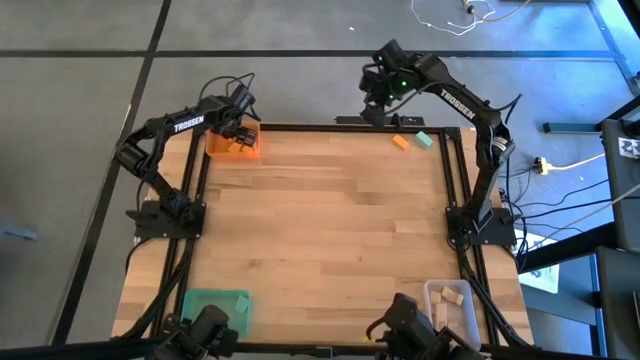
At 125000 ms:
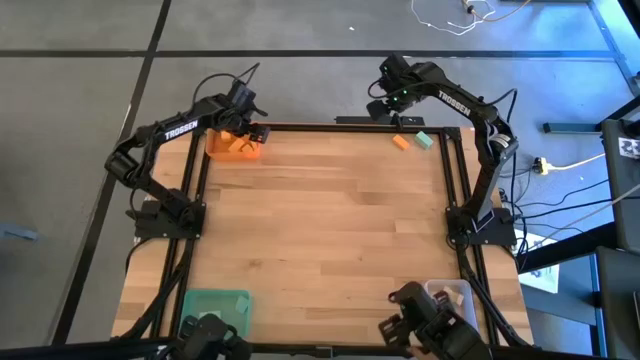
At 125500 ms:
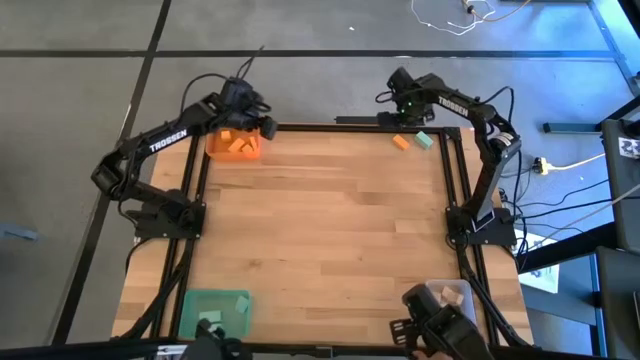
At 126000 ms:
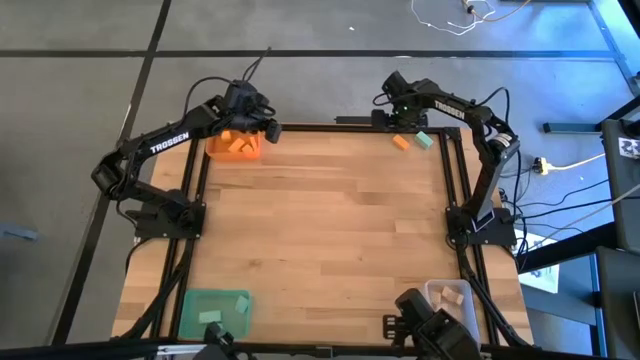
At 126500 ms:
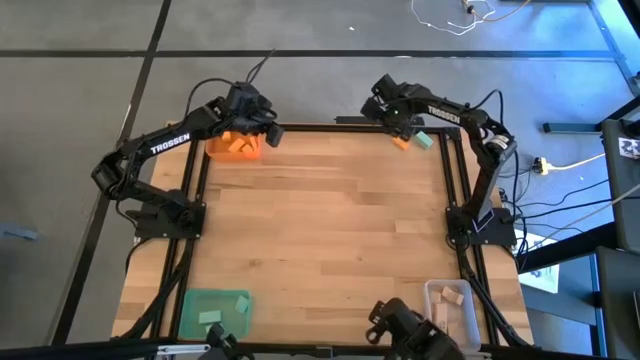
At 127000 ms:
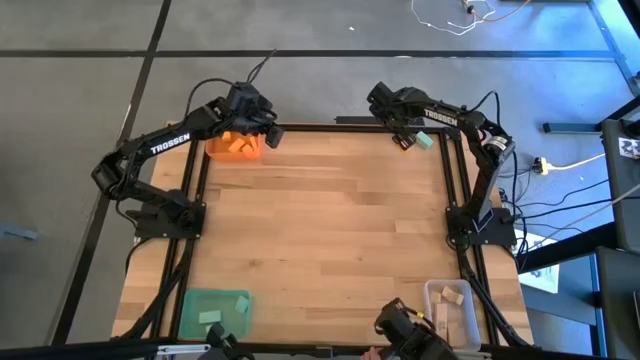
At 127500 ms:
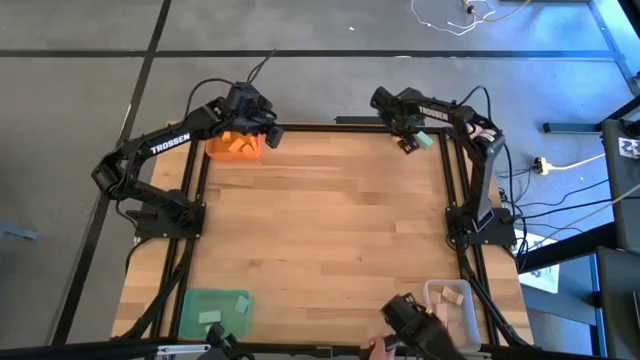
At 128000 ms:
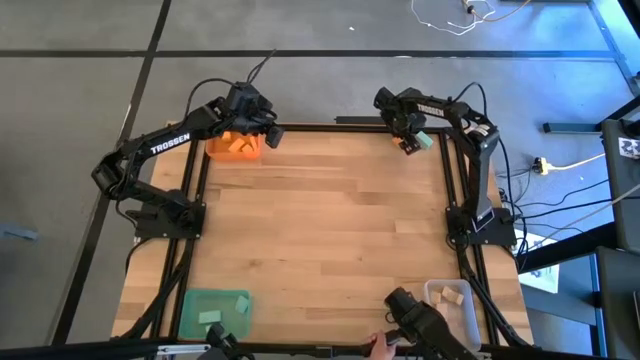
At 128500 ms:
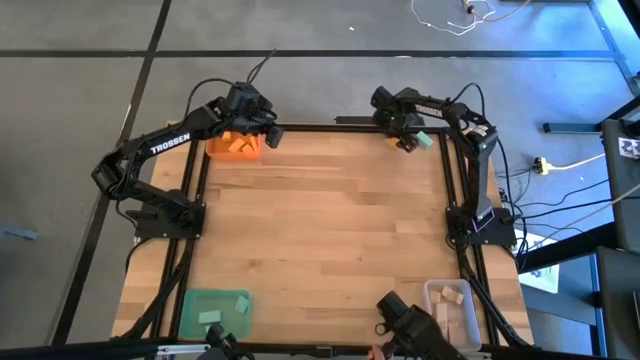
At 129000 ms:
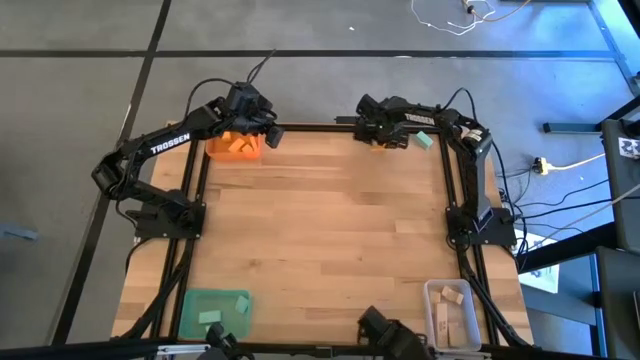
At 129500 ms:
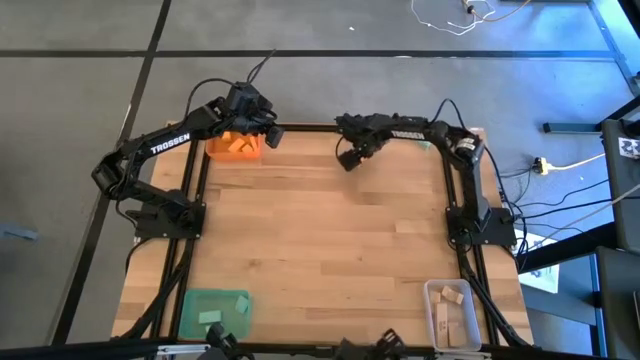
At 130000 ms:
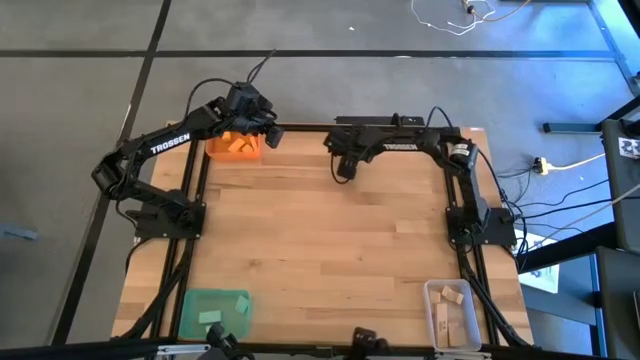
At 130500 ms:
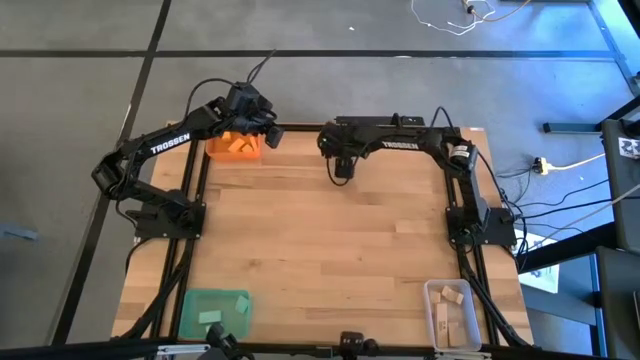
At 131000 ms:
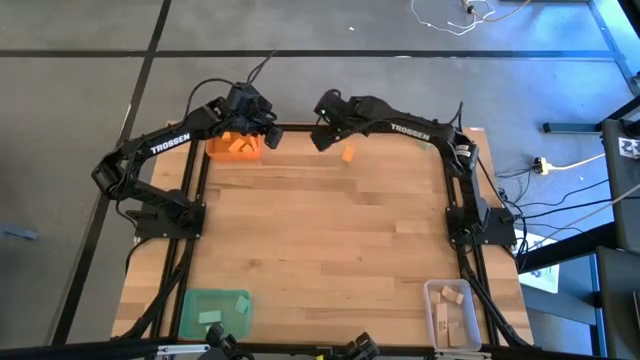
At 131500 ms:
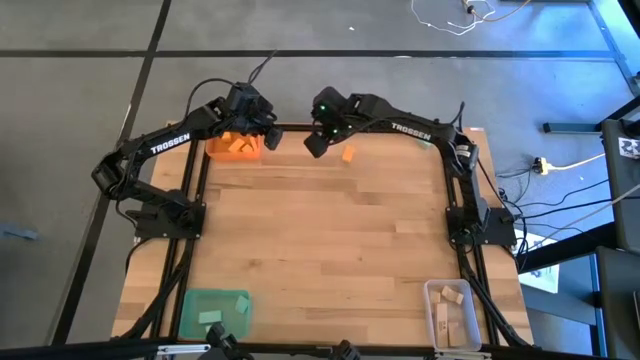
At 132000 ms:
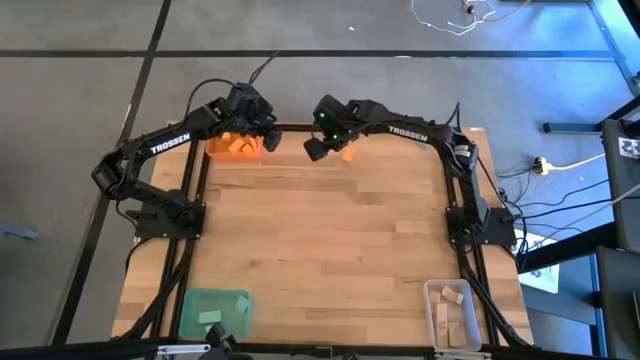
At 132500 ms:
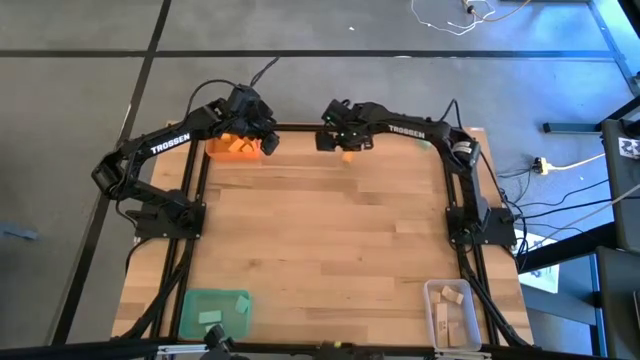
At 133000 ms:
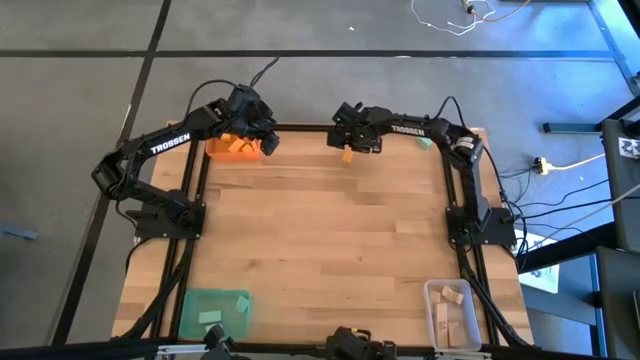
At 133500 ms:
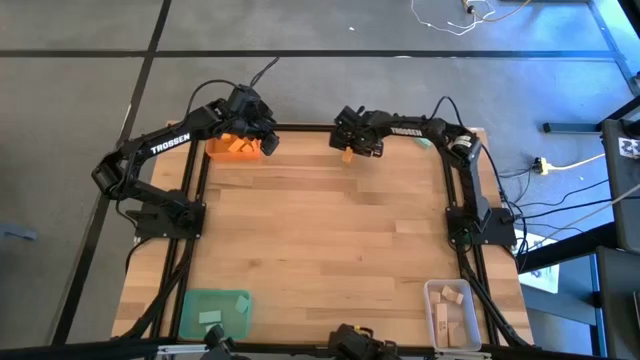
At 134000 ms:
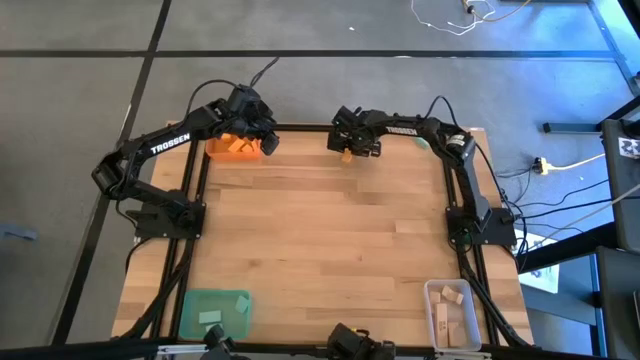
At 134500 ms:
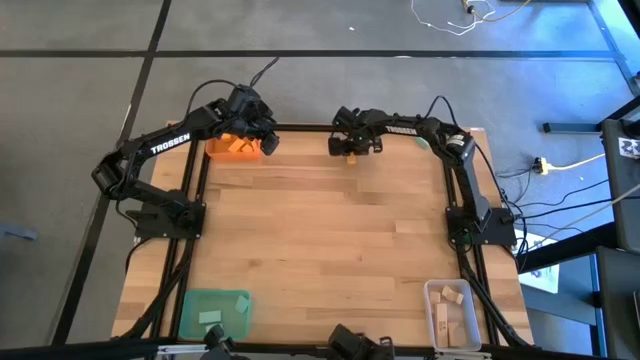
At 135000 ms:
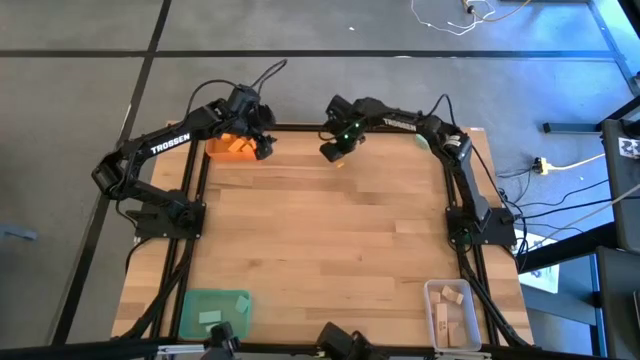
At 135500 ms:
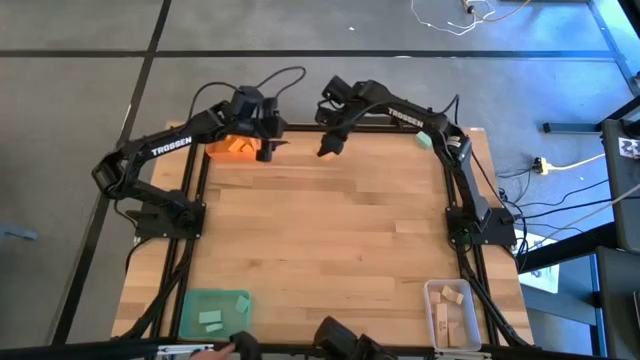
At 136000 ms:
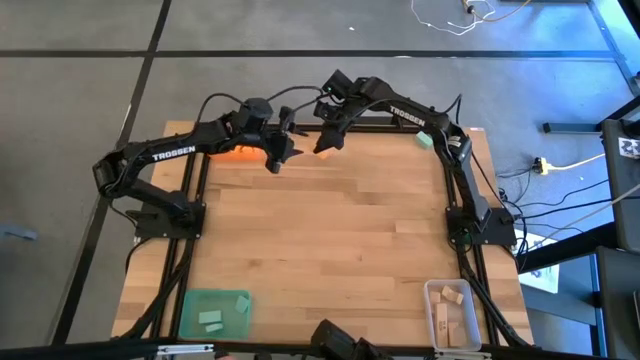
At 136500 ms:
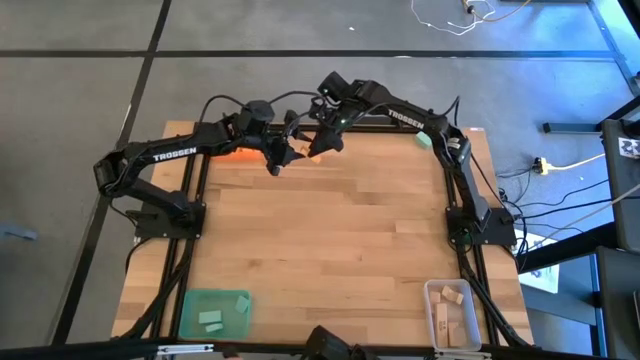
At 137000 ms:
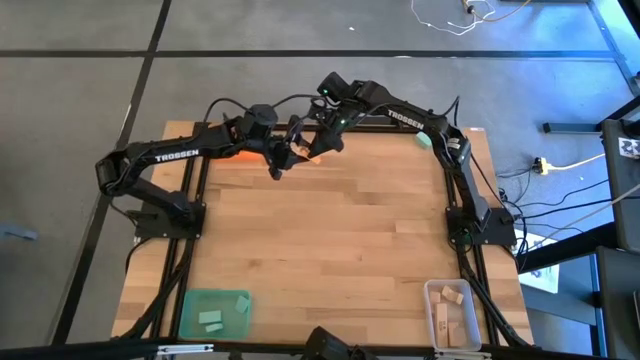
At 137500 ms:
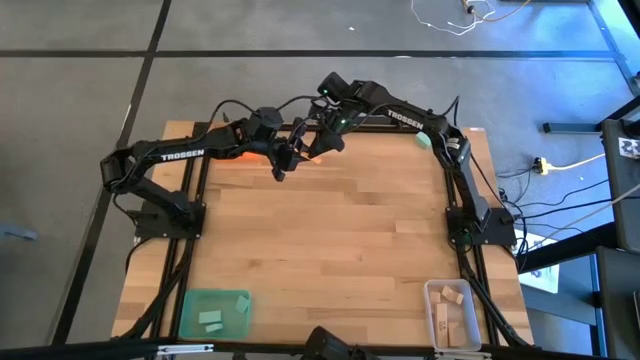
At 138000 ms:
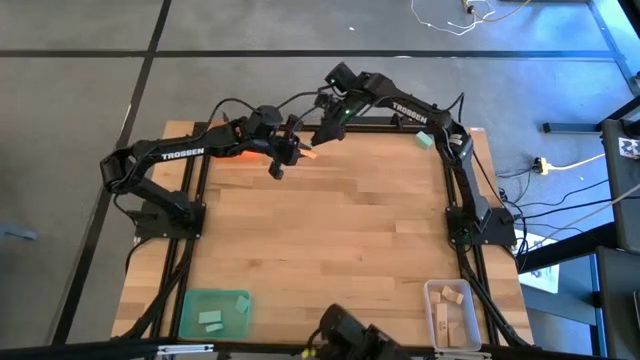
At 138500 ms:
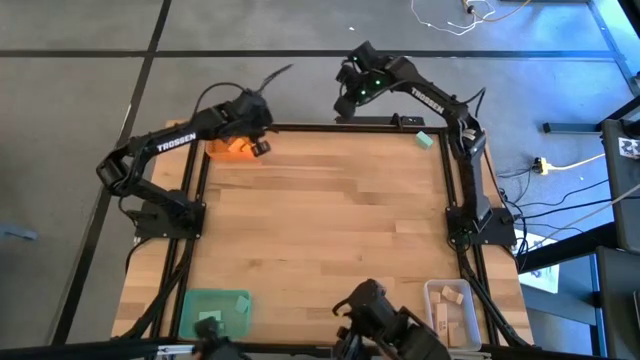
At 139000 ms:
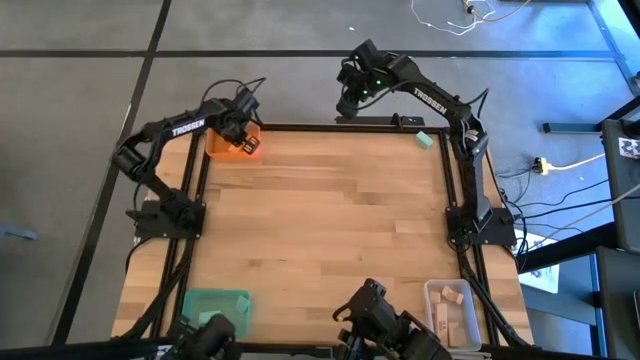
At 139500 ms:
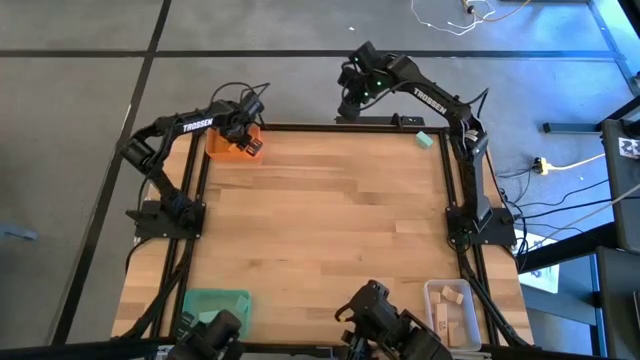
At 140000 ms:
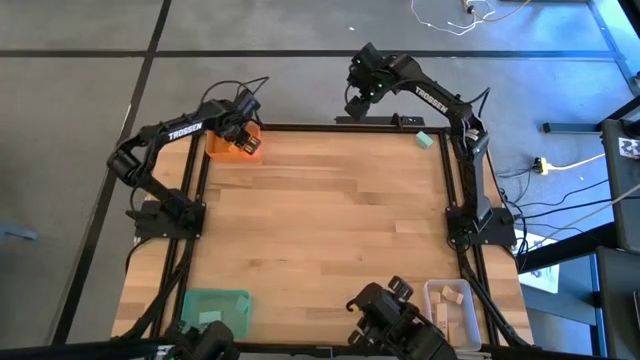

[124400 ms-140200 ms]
Task: Sort & place blocks by color
Put the orange block into the orange bin

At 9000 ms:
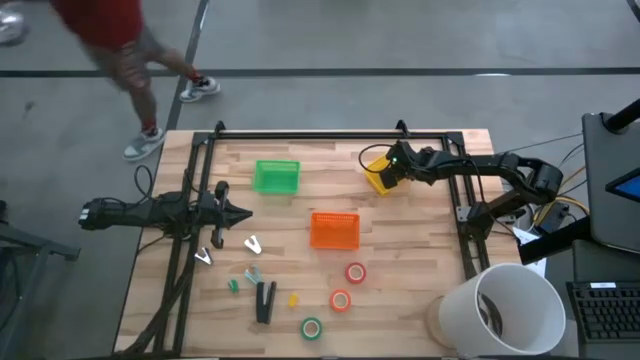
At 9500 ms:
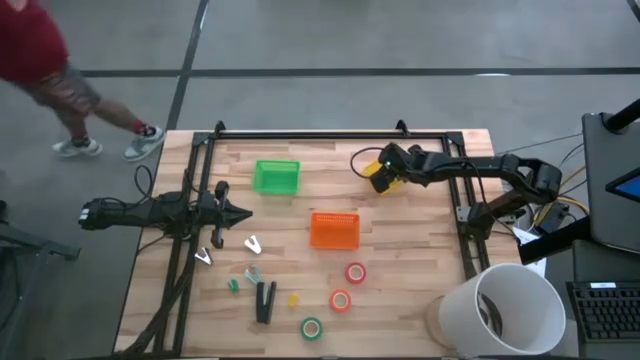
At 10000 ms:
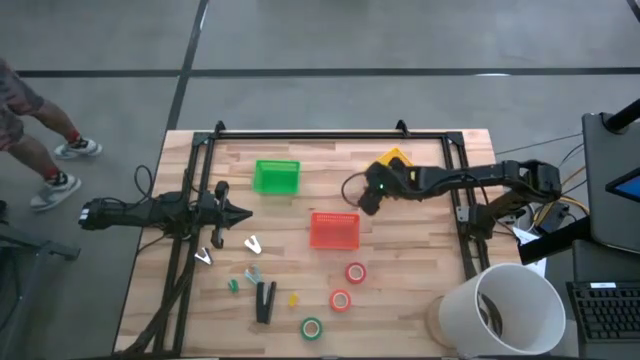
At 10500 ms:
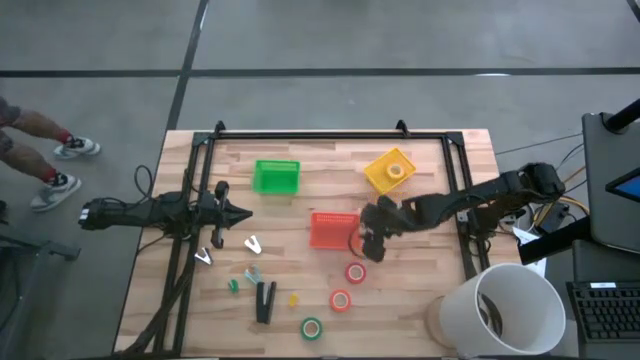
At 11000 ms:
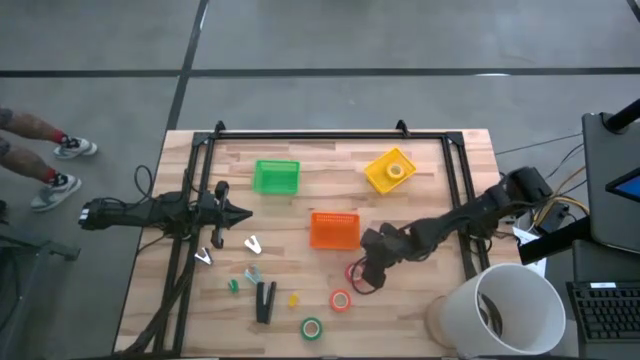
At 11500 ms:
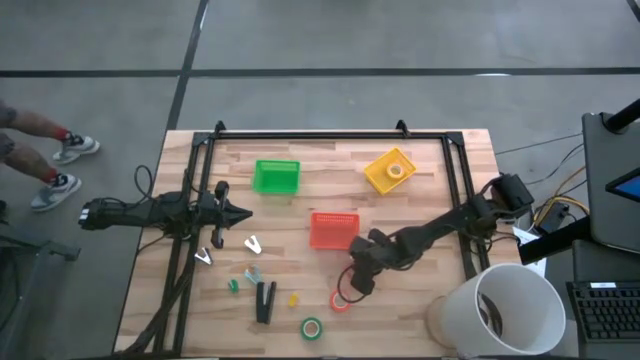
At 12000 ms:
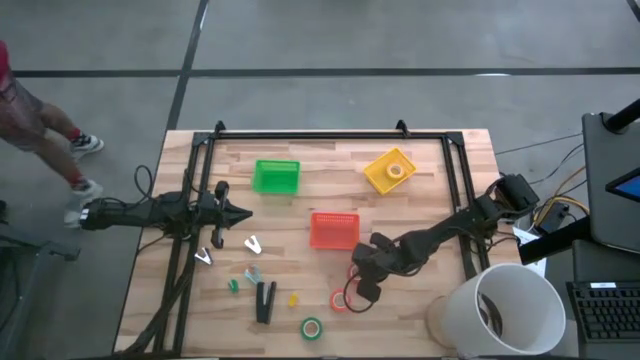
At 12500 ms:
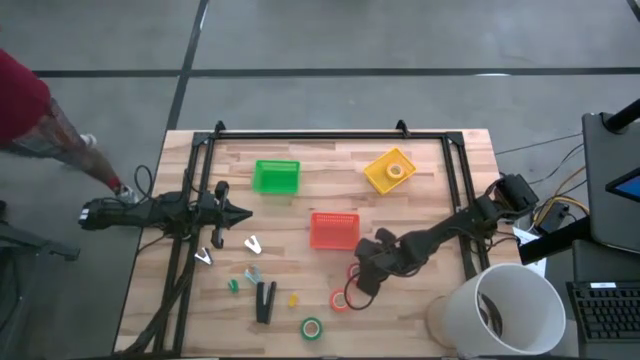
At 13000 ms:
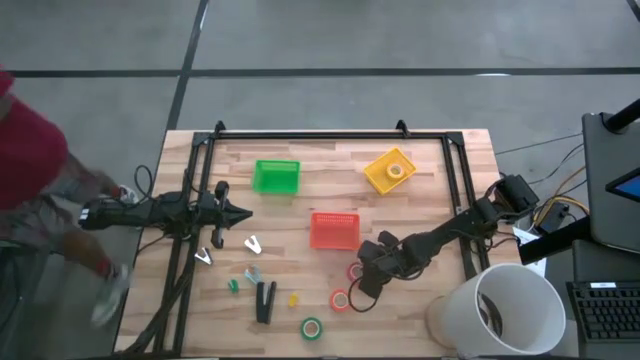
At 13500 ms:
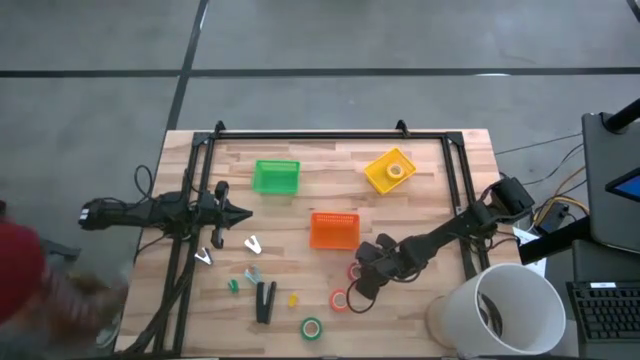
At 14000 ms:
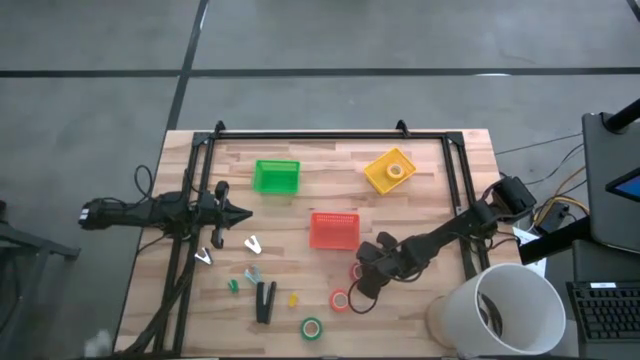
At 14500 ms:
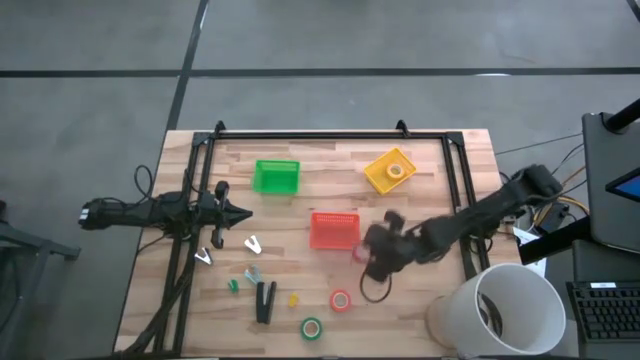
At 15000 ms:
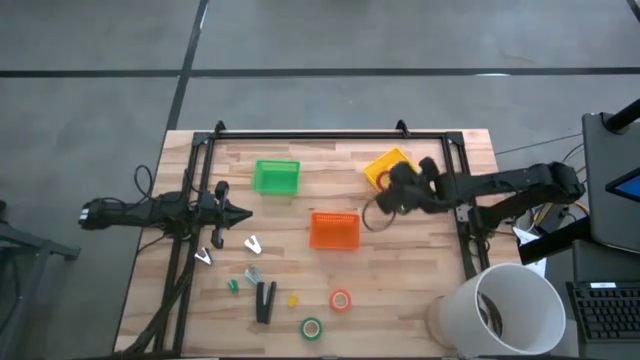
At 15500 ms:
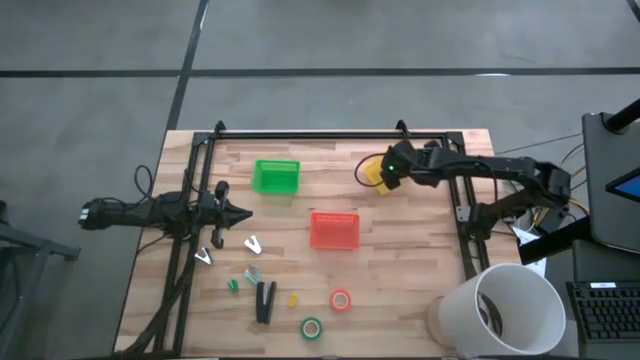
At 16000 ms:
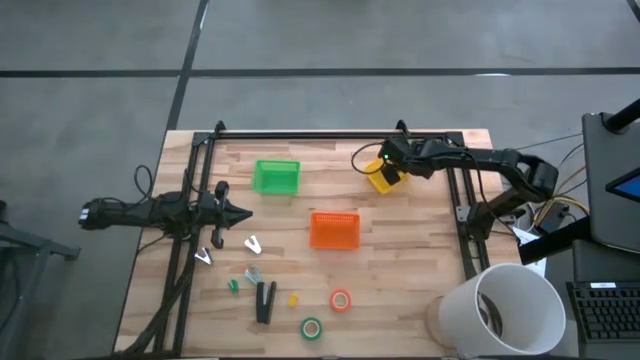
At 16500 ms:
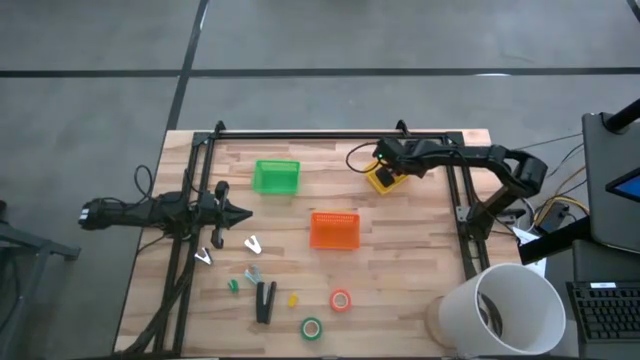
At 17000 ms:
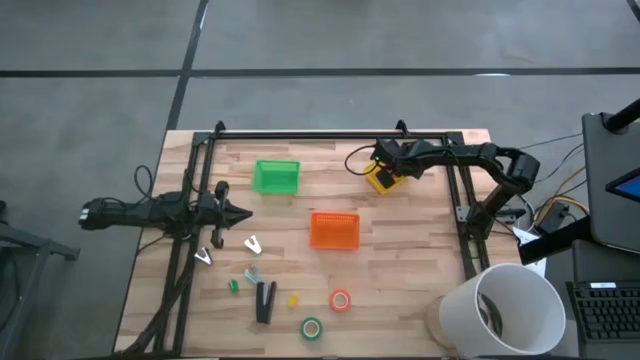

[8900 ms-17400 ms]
Task: Pick and place Stapler, Stapler remover, tape
Put the red tape into the yellow bin
